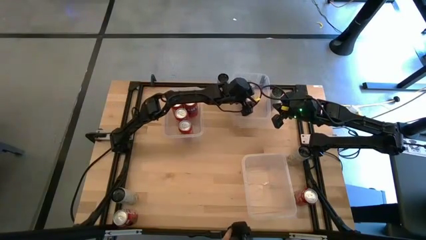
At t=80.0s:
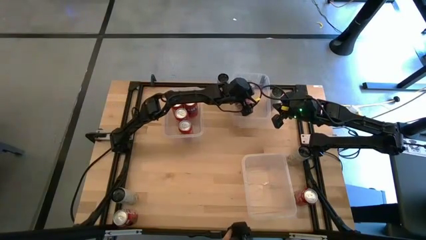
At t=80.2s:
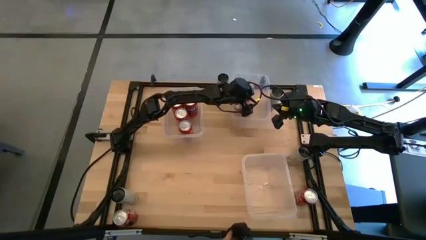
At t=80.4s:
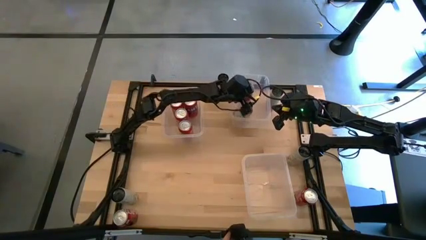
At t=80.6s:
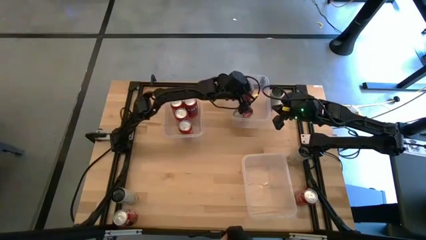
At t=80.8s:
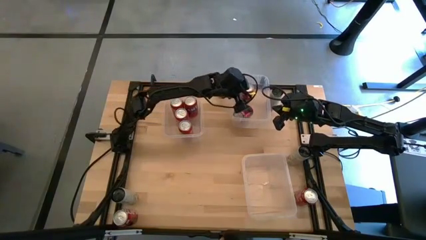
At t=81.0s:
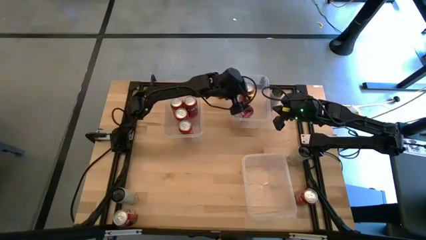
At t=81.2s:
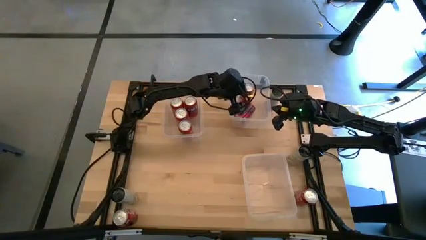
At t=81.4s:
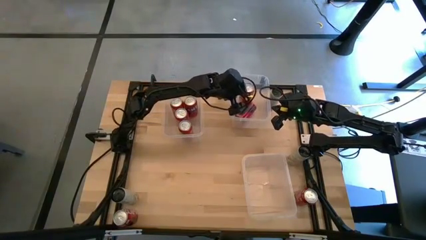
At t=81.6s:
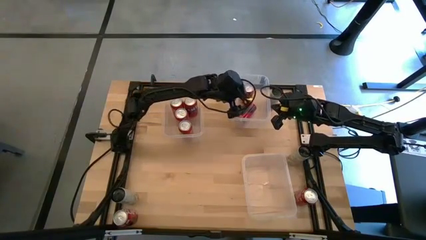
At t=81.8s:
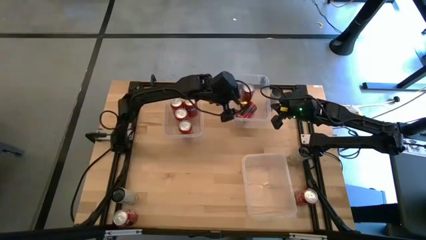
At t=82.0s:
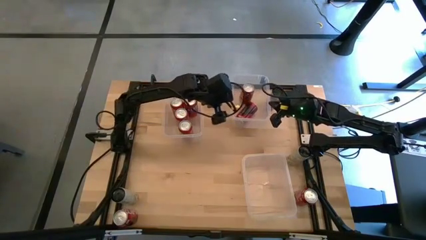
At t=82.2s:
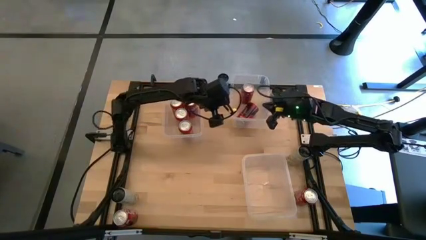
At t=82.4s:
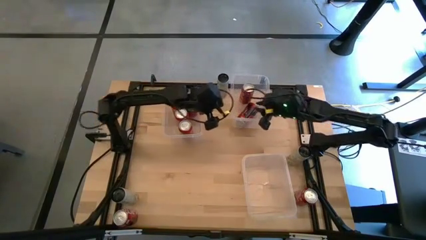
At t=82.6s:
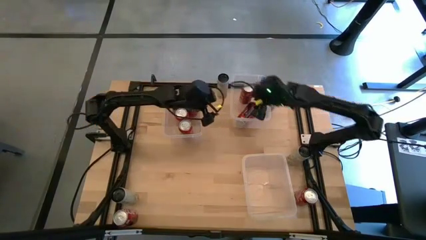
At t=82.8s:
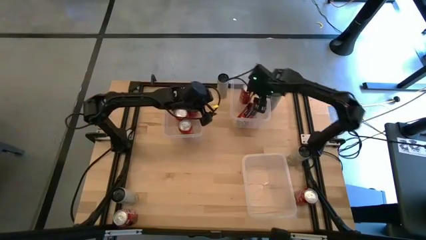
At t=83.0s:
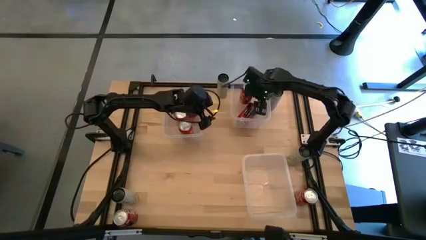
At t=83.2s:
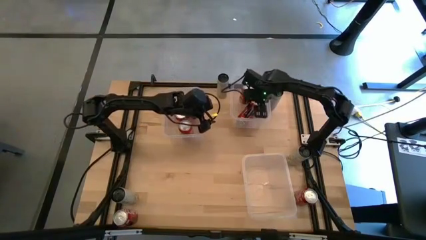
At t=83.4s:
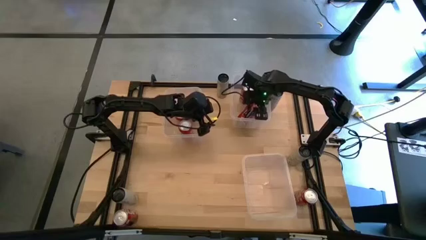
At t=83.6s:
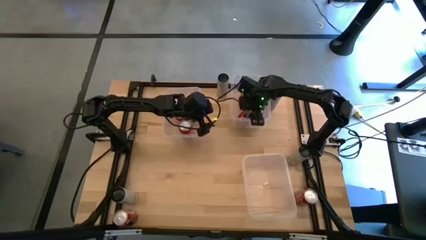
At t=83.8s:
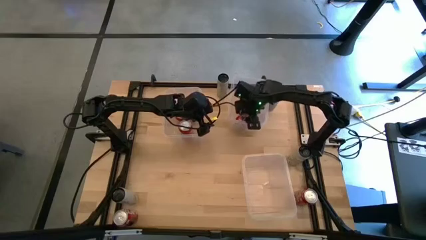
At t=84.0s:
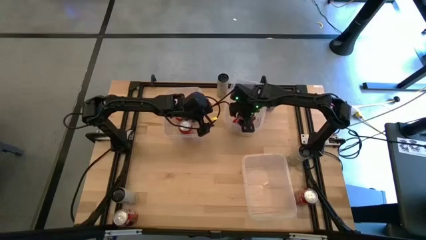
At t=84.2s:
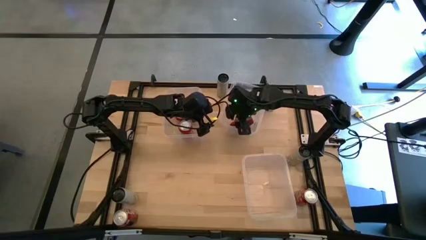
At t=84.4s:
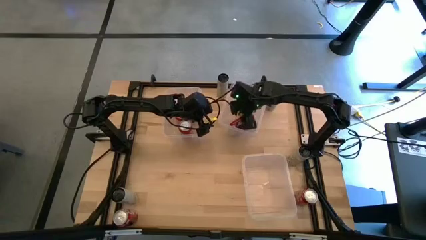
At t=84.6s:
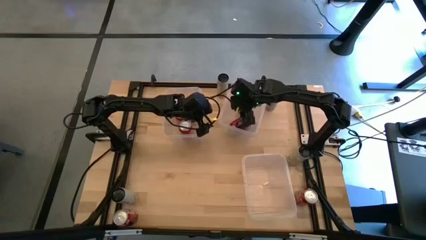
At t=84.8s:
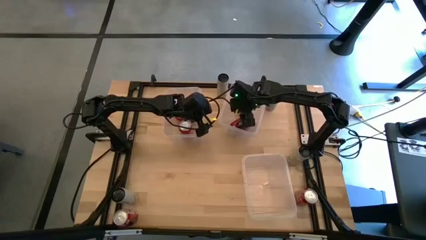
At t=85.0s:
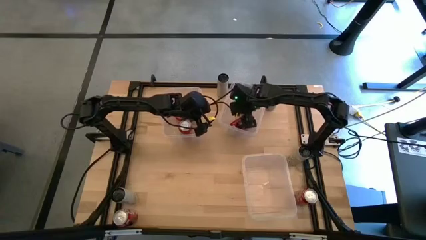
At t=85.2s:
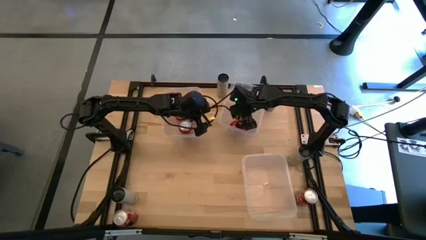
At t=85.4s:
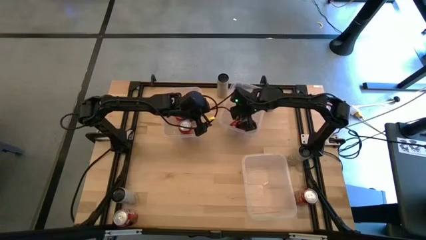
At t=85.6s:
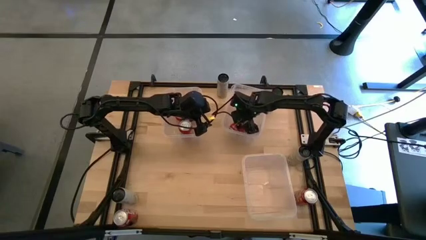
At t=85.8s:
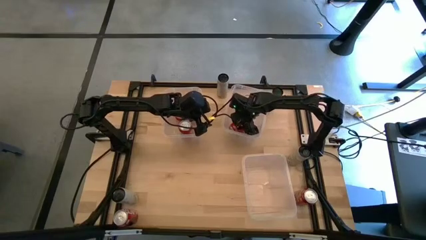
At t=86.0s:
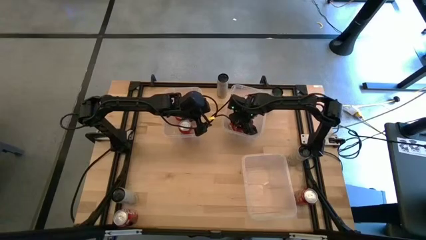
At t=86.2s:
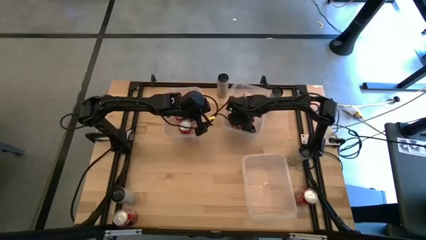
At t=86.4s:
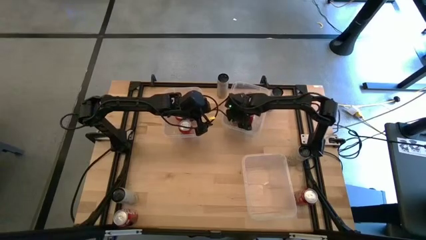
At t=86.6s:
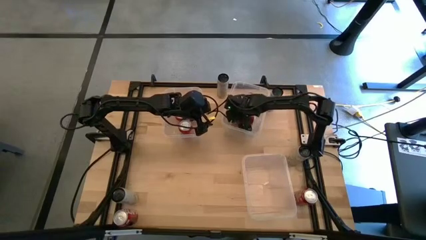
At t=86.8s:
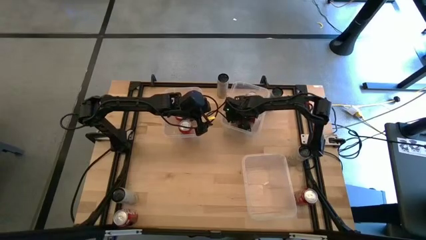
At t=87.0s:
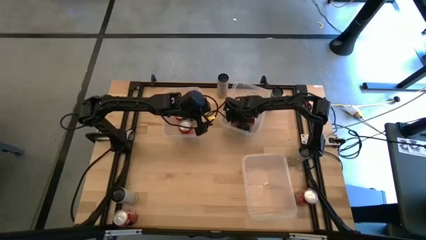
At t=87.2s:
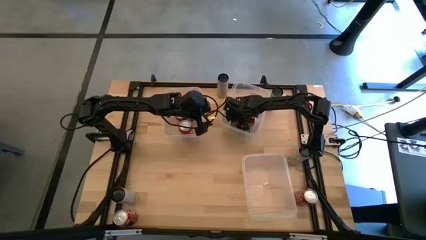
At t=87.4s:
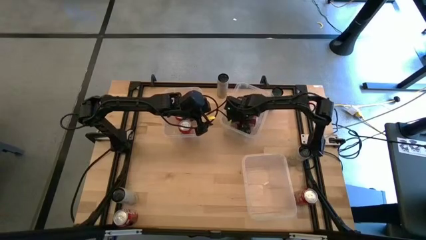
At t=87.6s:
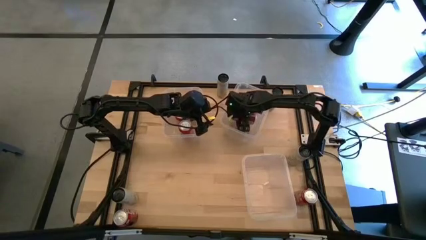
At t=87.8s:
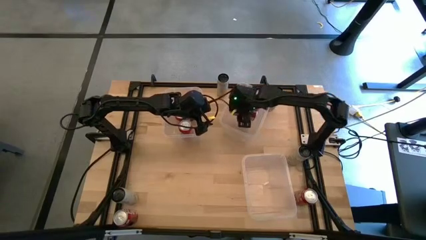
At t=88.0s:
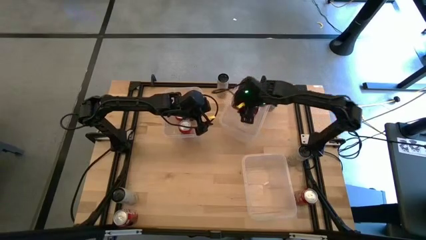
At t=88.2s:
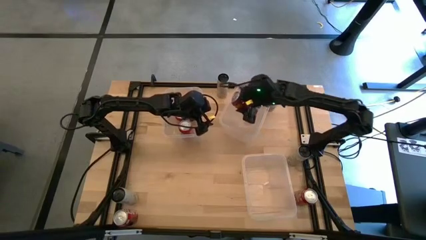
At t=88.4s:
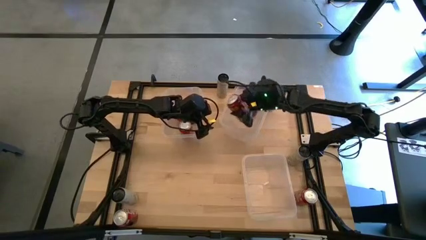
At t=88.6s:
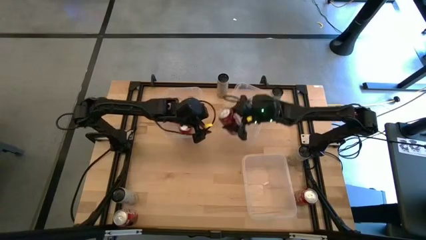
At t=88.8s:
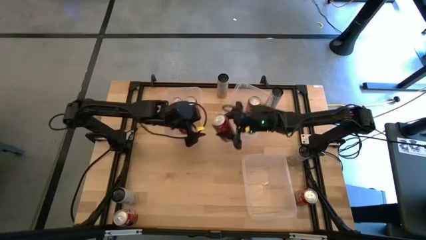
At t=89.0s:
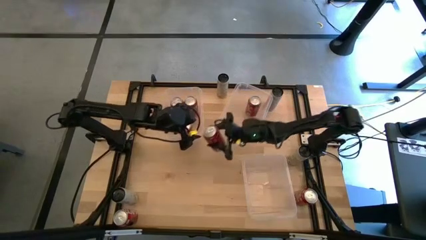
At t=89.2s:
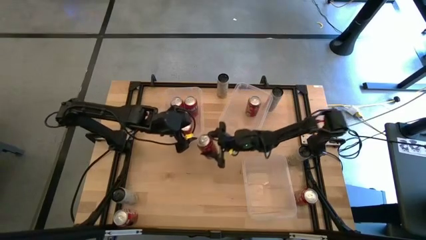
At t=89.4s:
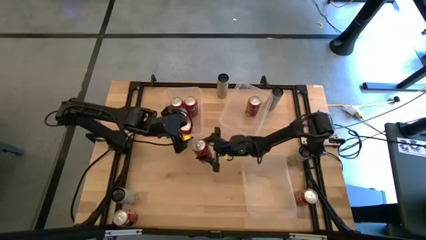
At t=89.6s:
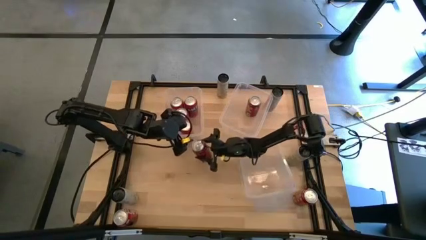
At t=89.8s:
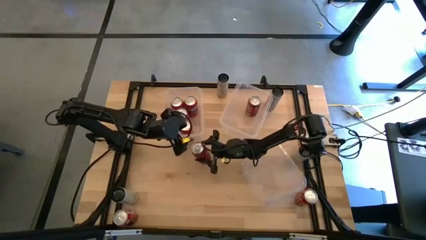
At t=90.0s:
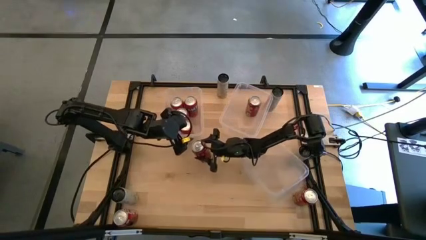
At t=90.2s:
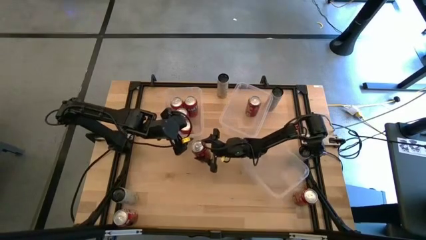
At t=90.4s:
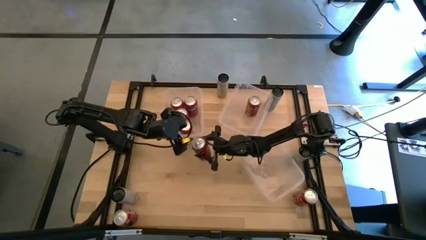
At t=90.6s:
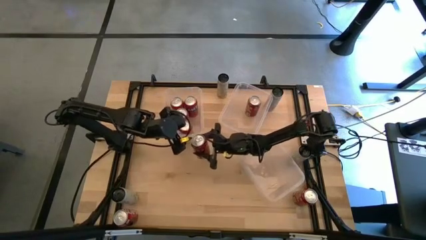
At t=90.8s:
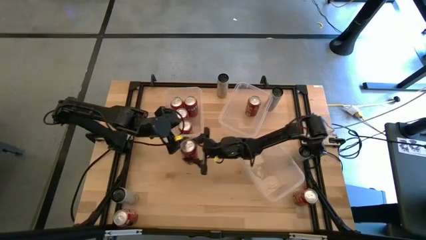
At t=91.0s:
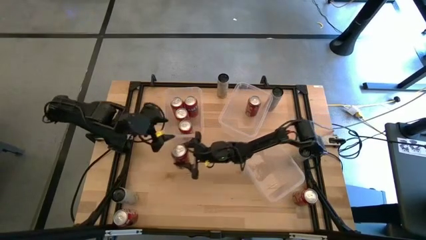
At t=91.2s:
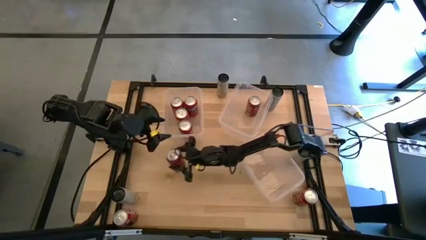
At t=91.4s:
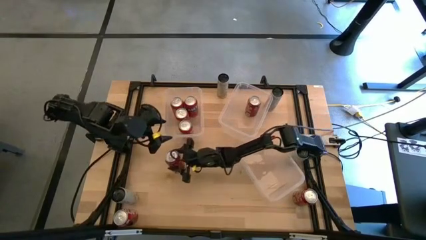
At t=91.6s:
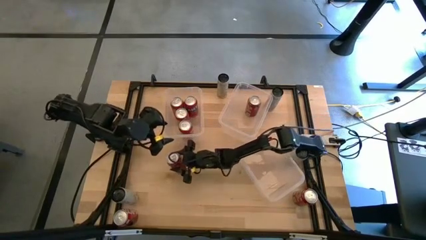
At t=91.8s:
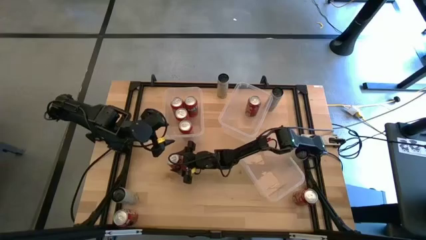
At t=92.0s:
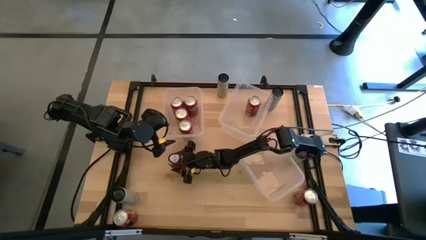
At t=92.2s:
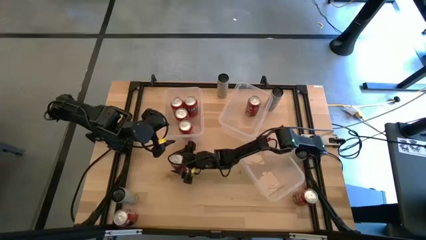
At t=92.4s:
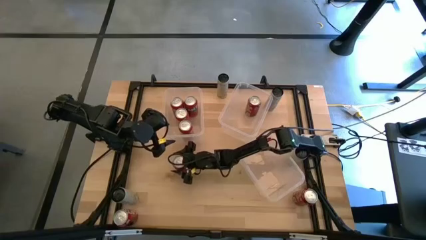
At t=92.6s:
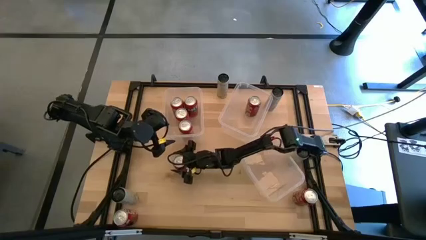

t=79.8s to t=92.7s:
Task: Sort soda cans
Remove the top red-white soda can from the top right transparent bin
